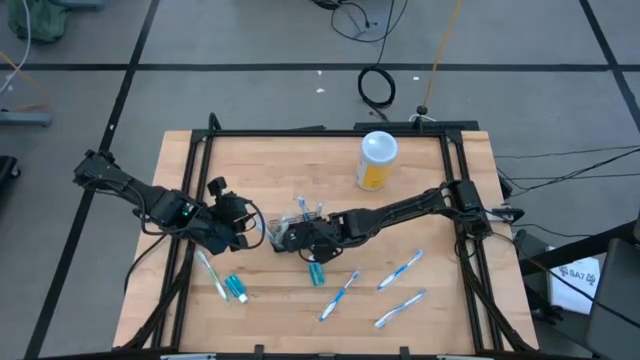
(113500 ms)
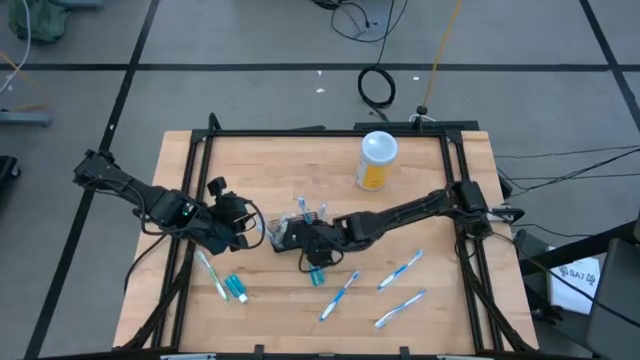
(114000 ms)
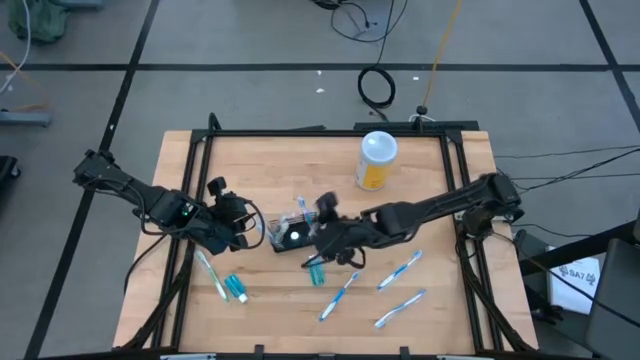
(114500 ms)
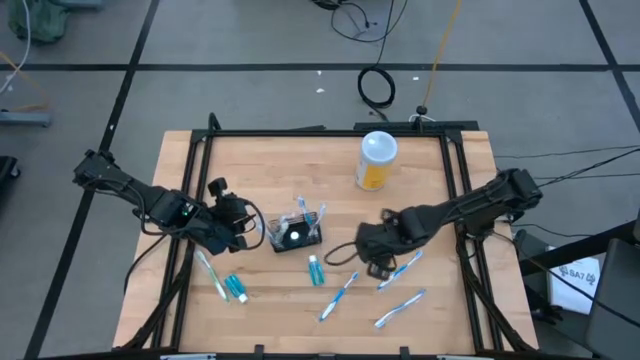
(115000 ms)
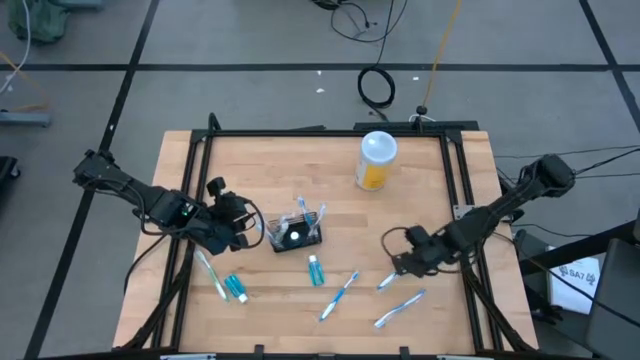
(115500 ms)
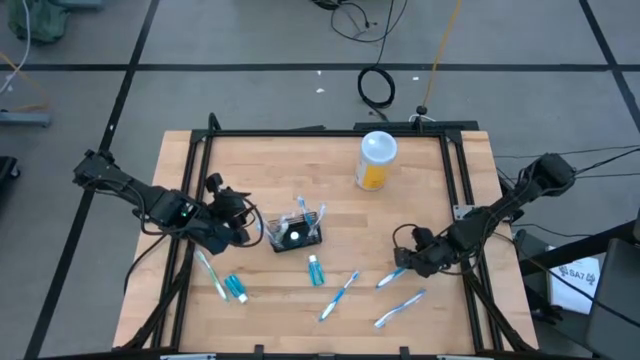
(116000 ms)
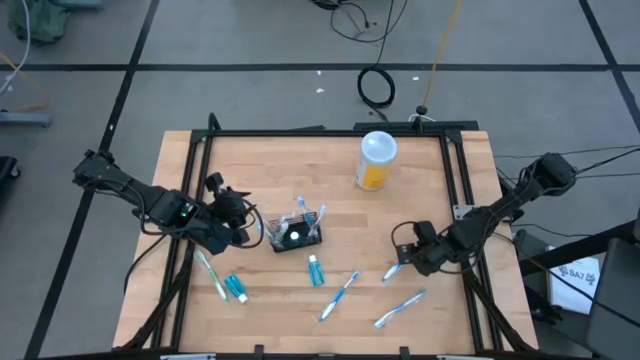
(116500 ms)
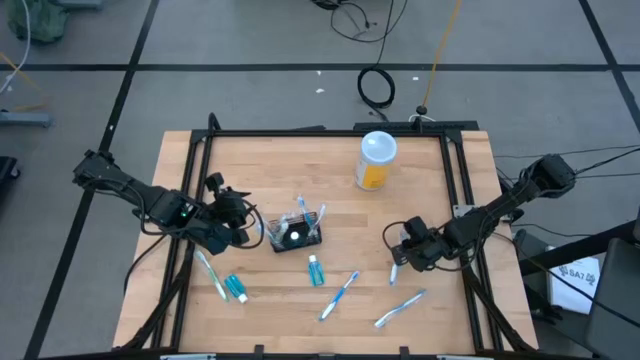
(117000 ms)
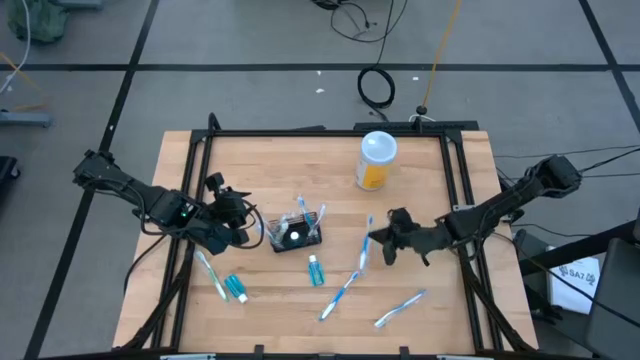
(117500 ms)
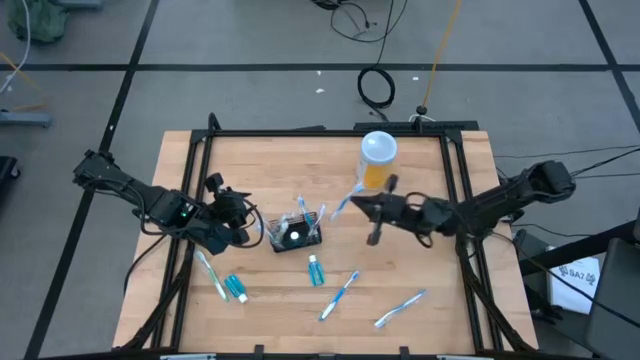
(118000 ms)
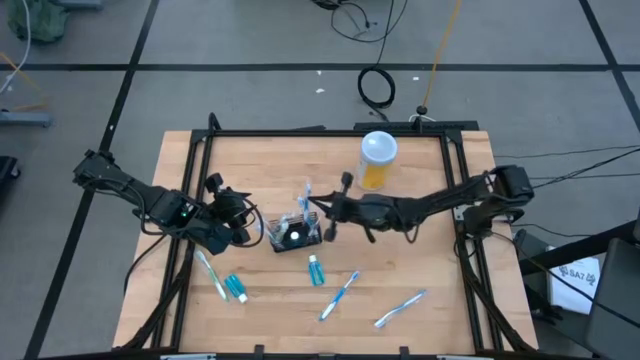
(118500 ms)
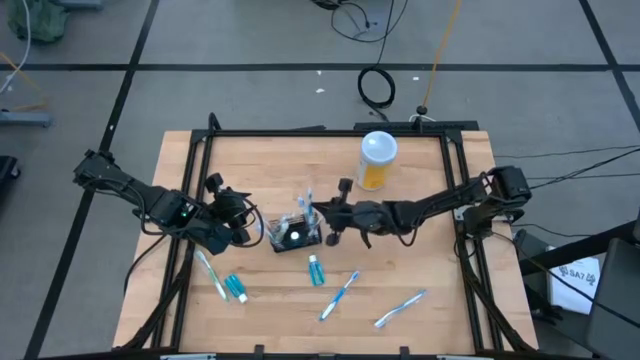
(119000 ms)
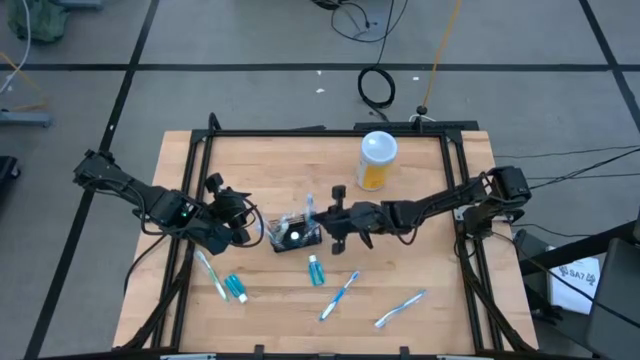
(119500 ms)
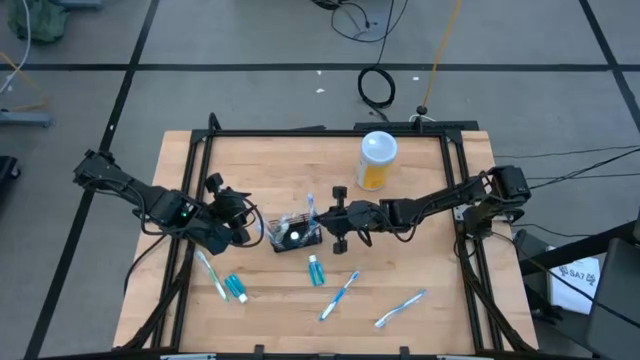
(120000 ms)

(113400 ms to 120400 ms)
Task: Pick & Place toothbrushing station
Put the top right blue toothbrush into the black wire organizer

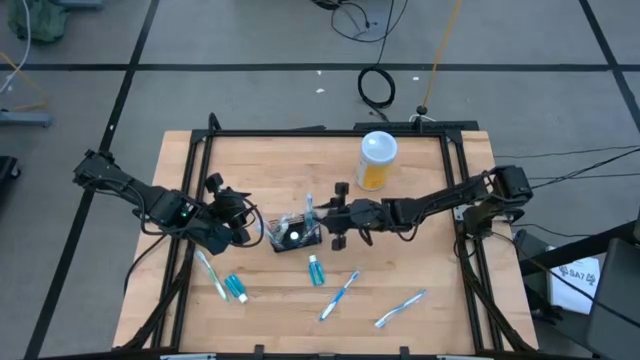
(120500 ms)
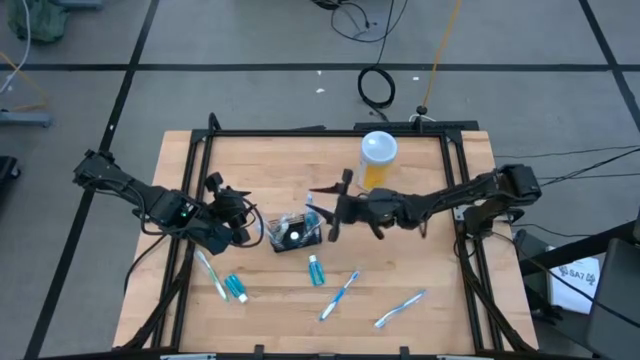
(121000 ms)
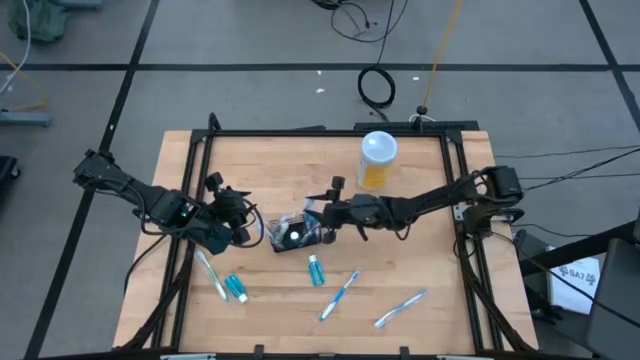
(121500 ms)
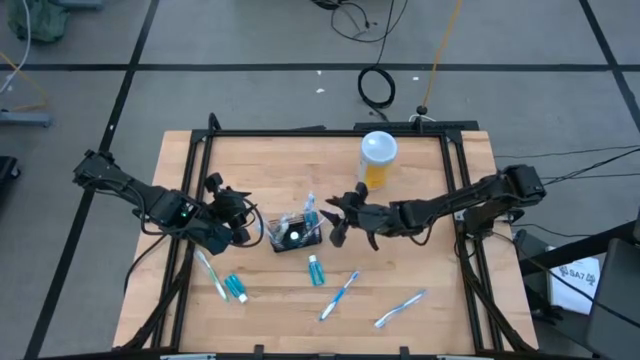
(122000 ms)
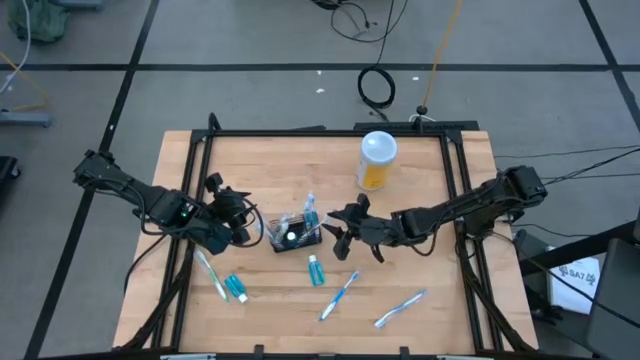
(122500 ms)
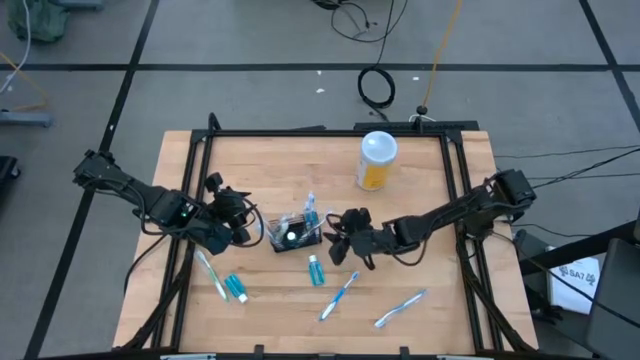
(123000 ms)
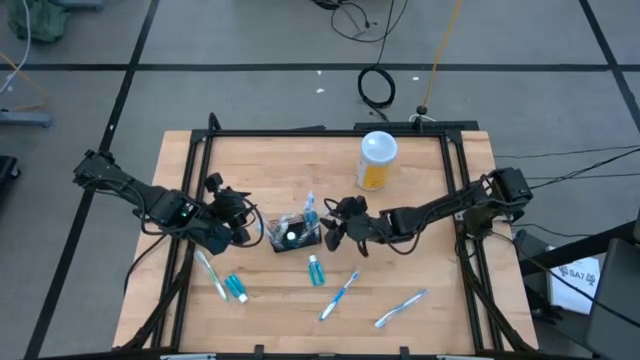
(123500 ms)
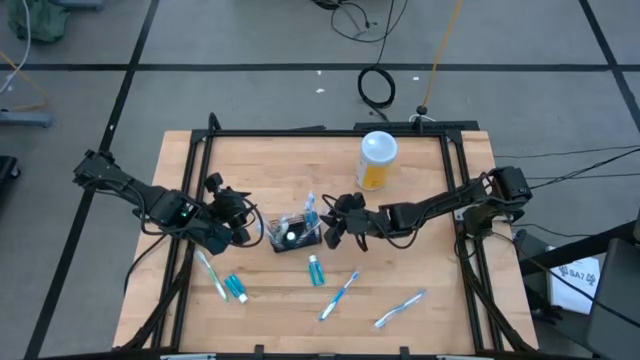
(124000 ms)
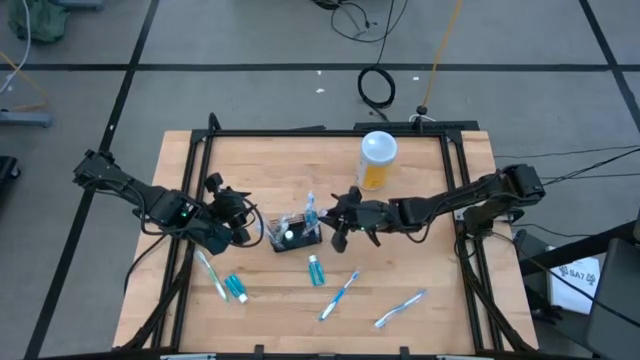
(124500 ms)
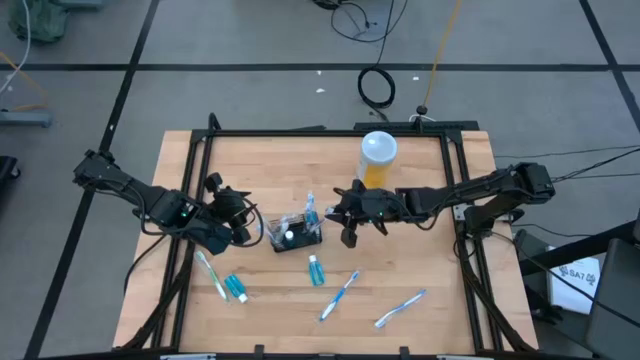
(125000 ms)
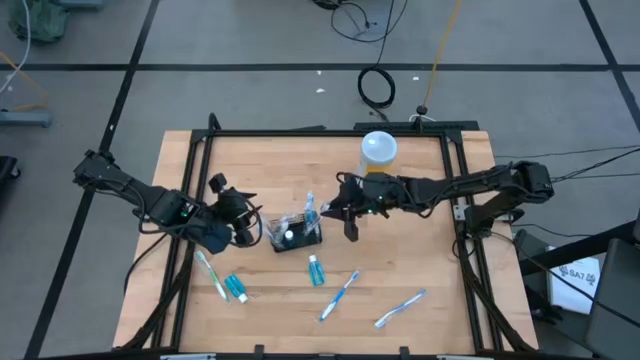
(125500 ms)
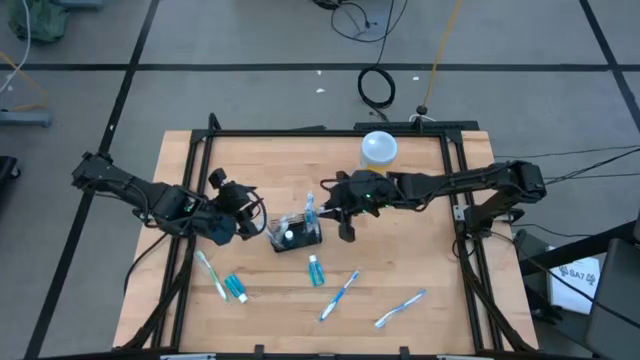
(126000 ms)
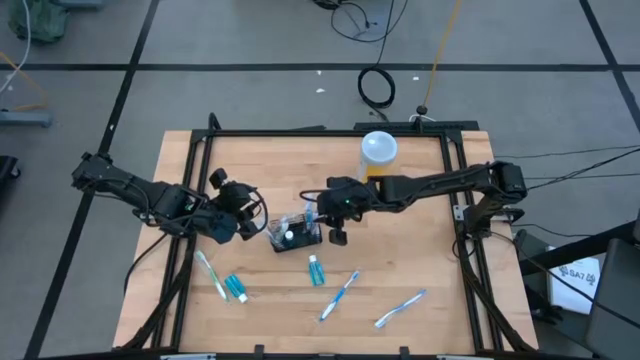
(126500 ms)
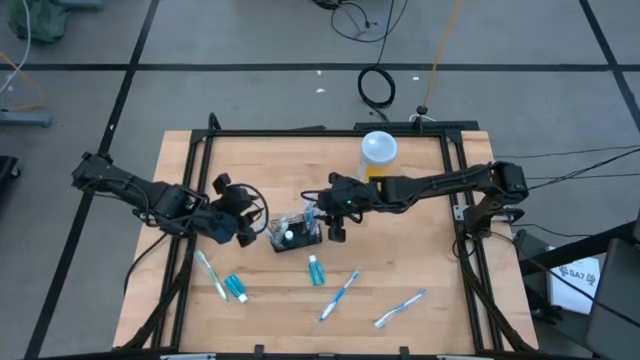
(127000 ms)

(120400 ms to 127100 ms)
Adjust the violet toothbrush

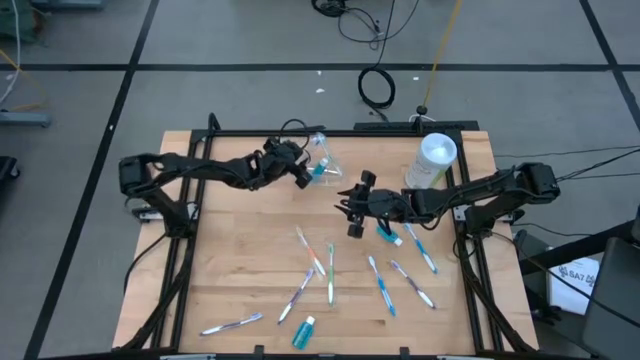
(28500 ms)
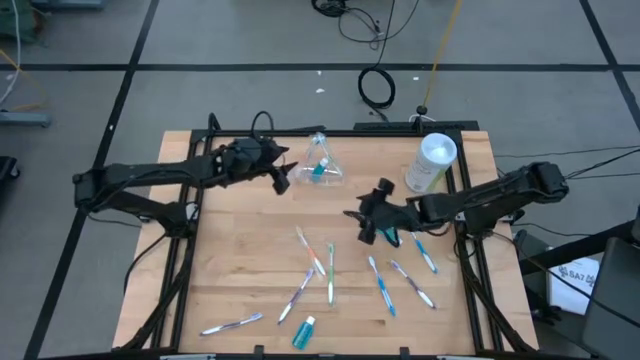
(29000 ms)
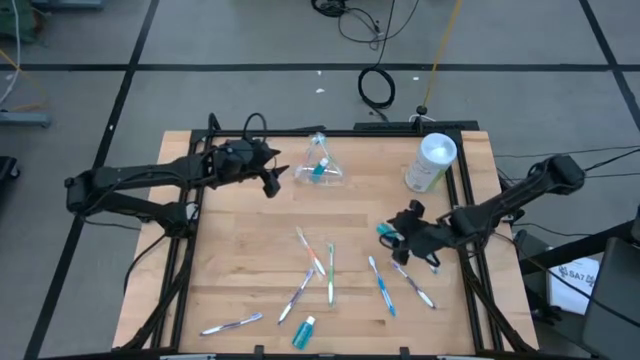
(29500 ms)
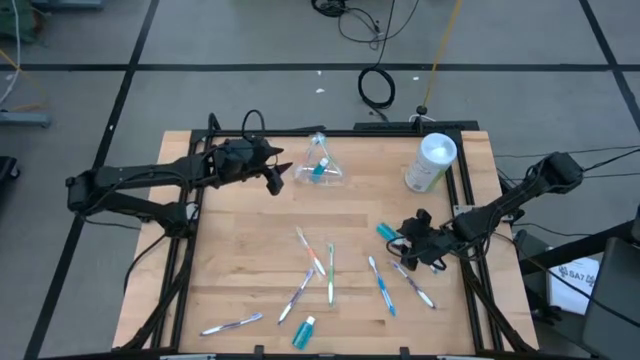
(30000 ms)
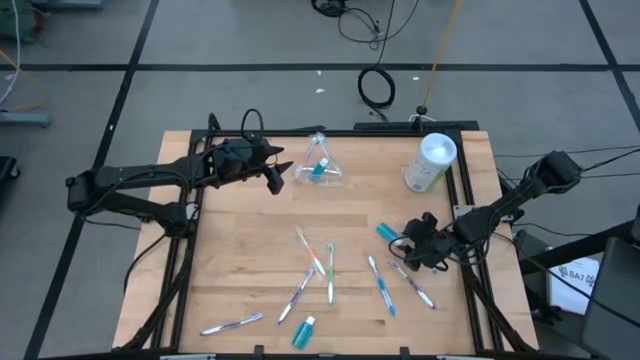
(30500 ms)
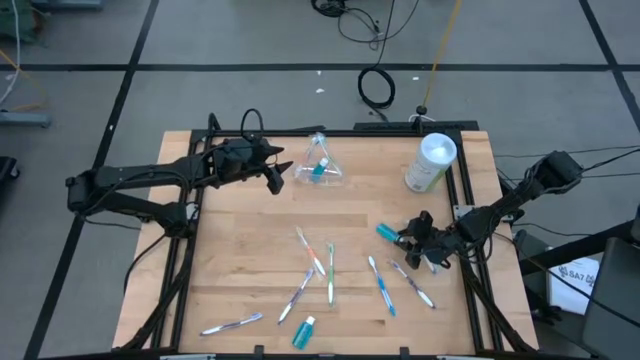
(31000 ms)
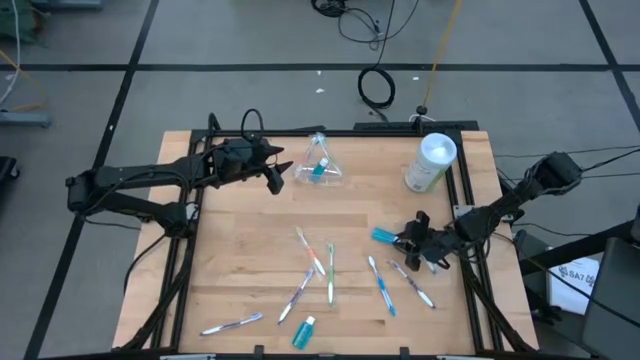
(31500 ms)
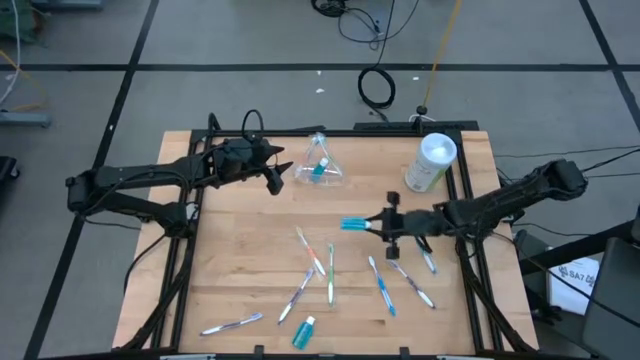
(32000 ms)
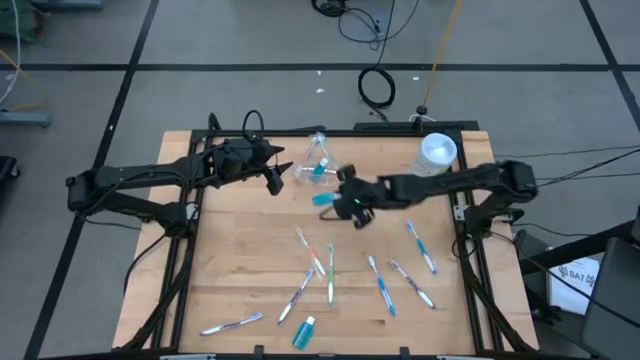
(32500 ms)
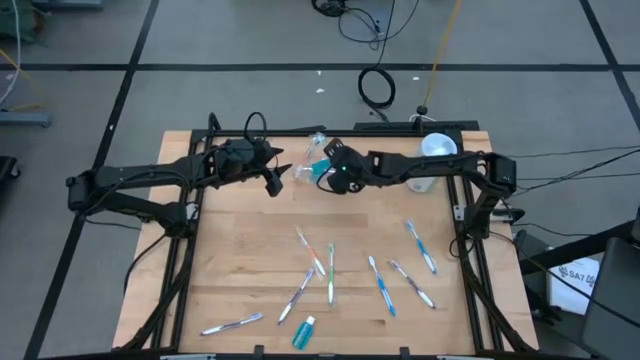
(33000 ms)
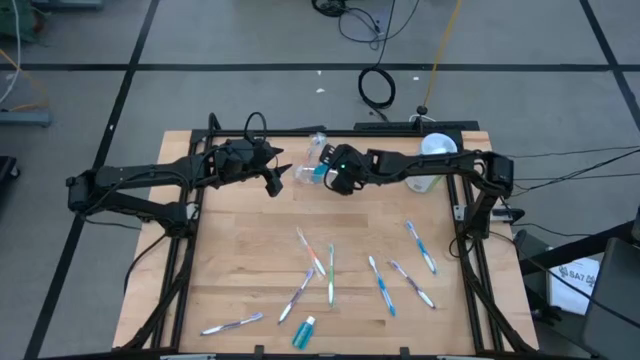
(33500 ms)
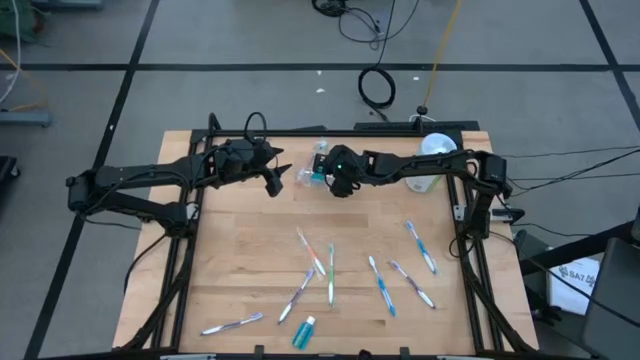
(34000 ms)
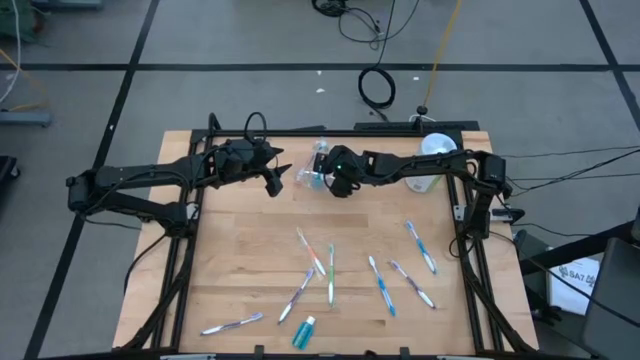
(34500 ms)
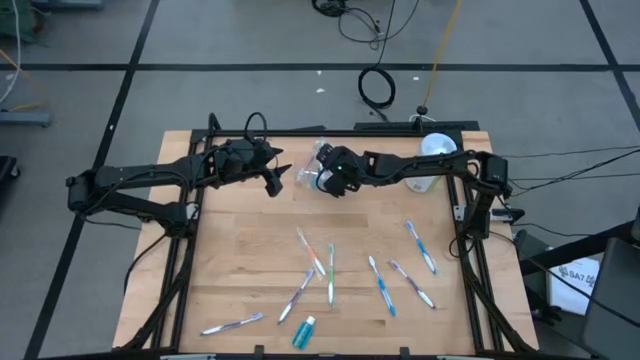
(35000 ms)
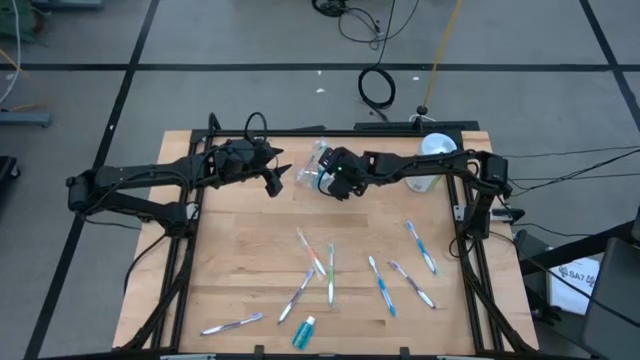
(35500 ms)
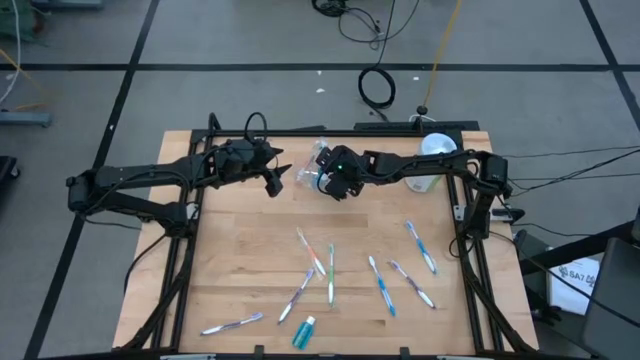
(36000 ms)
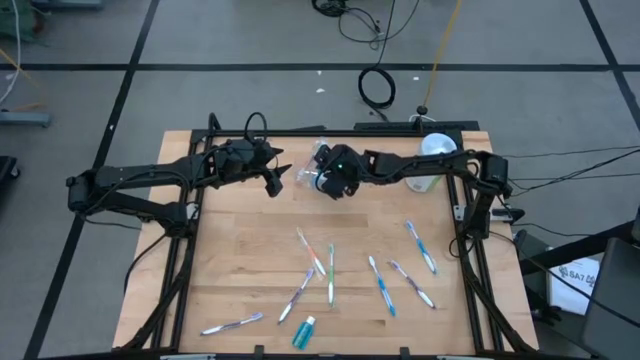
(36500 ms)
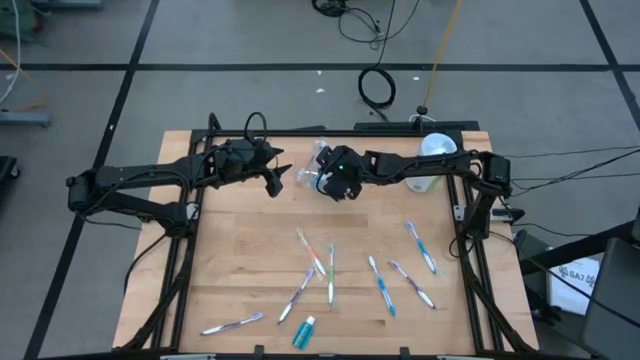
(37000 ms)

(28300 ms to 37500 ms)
Task: Pick & Place toothbrushing station
Put the top blue mouthwash into the transparent organizer
